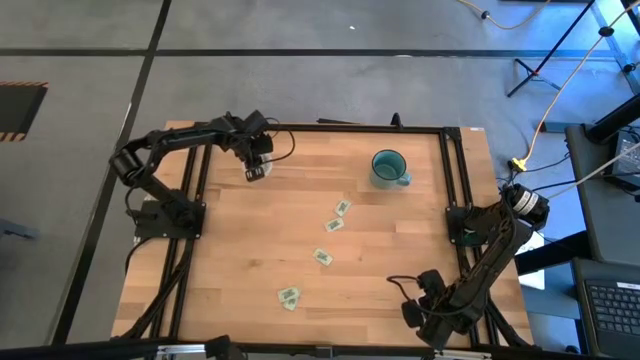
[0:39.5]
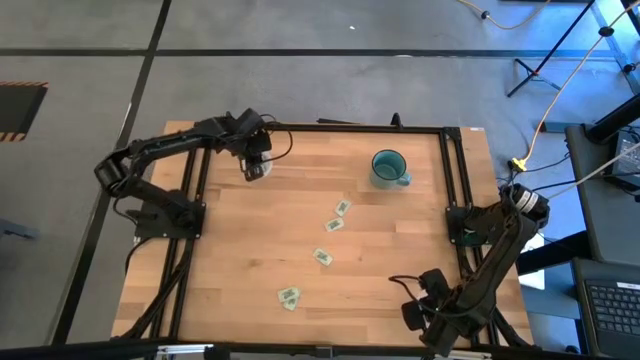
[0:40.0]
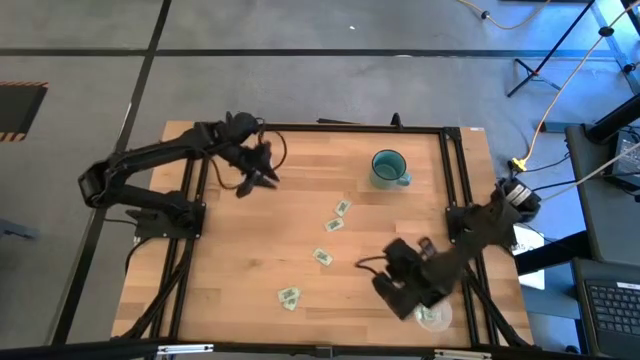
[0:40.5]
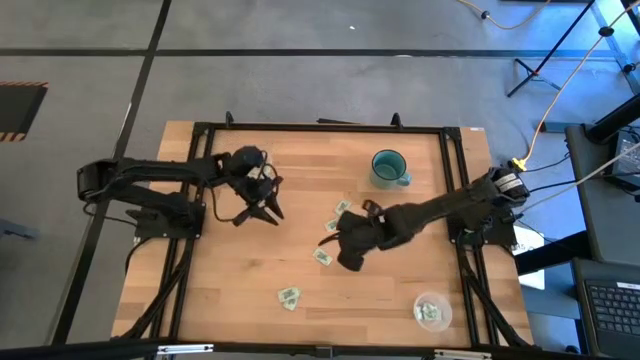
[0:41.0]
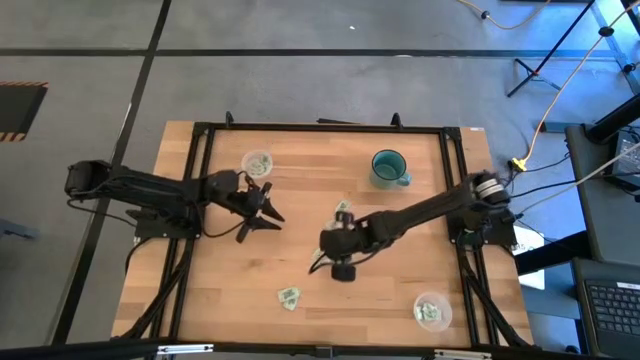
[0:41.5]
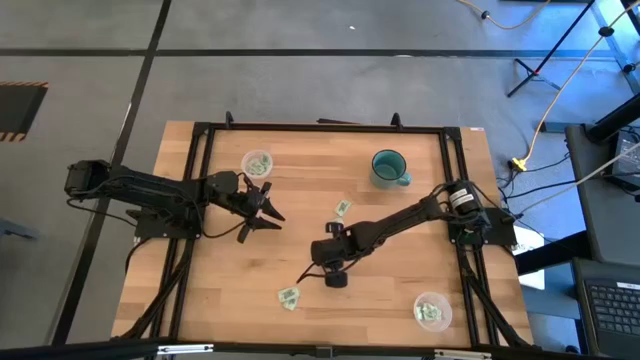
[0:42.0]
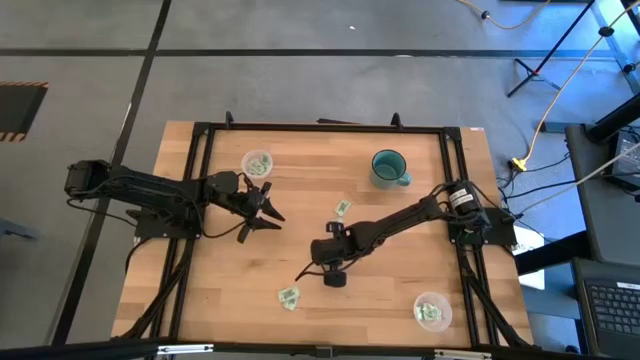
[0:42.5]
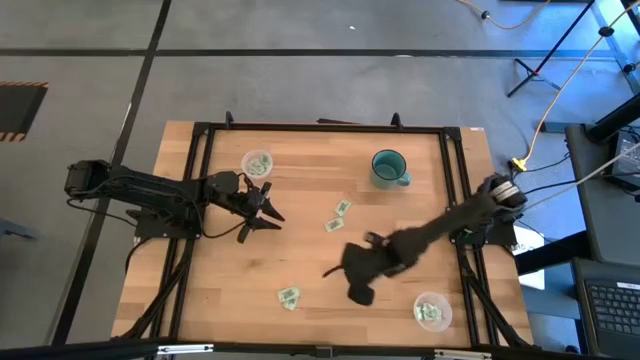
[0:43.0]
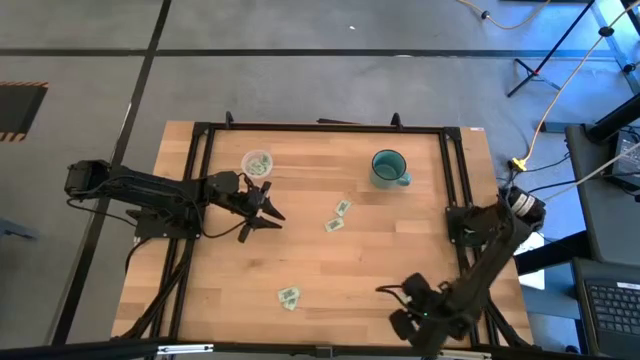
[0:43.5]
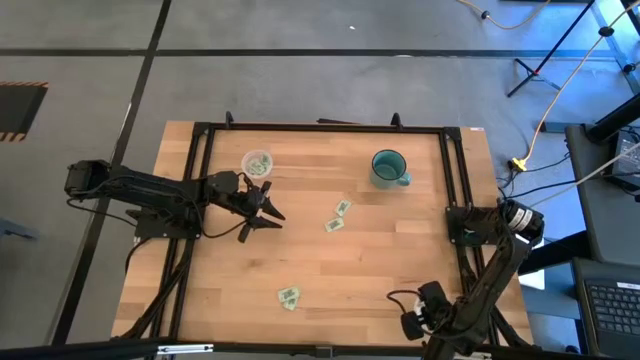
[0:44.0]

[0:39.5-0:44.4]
Task: Pick and place Stevia / Truvia into bins
Put the stevia packet into the bottom transparent container

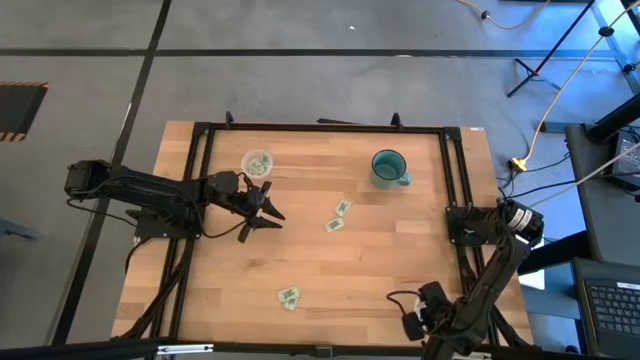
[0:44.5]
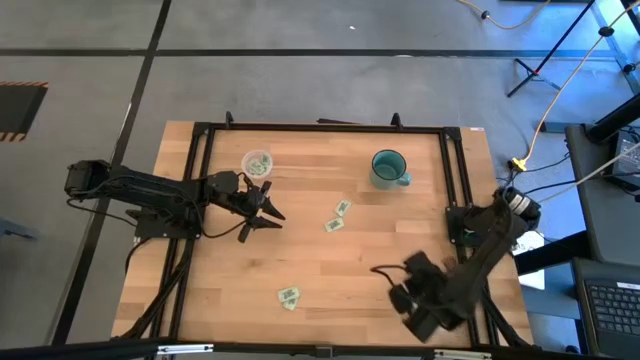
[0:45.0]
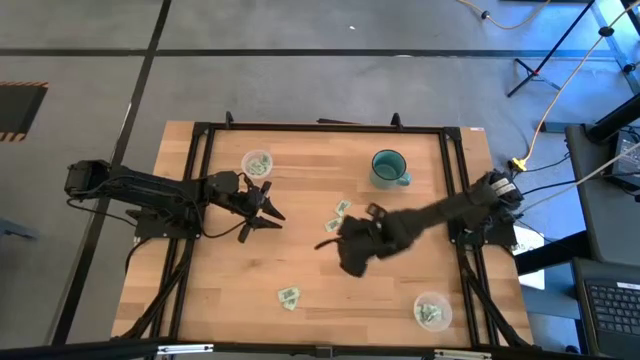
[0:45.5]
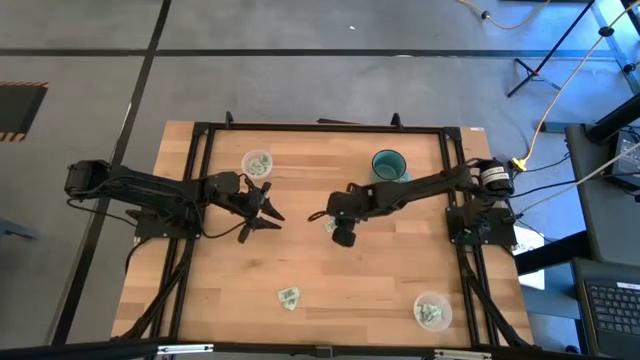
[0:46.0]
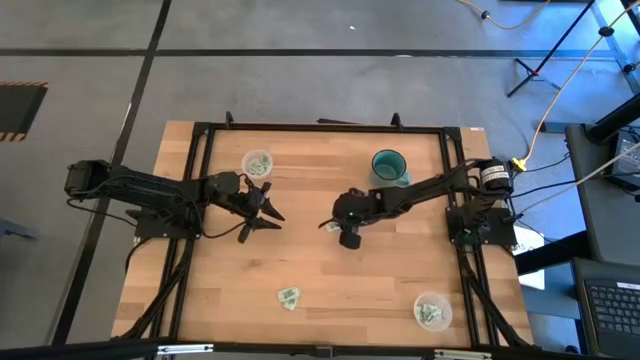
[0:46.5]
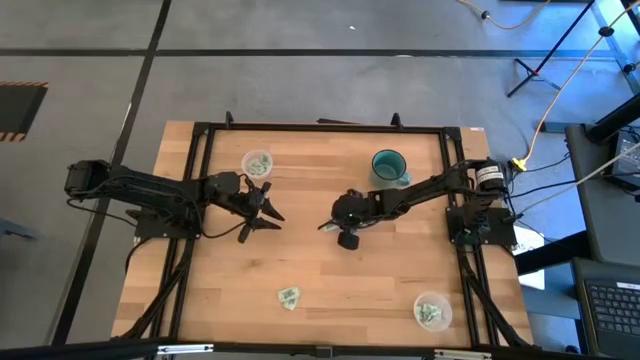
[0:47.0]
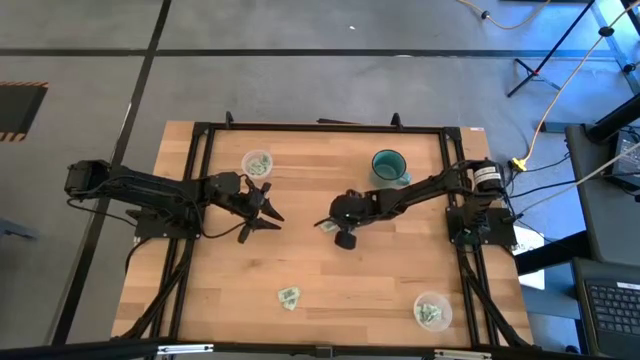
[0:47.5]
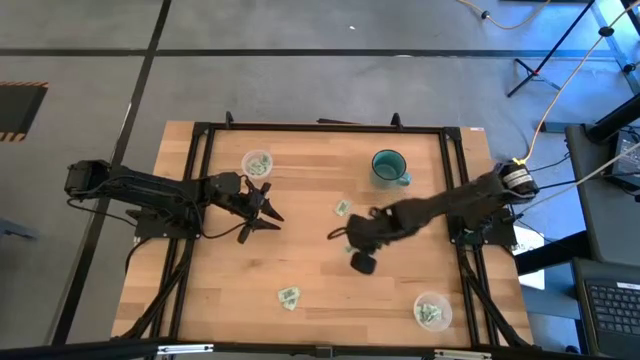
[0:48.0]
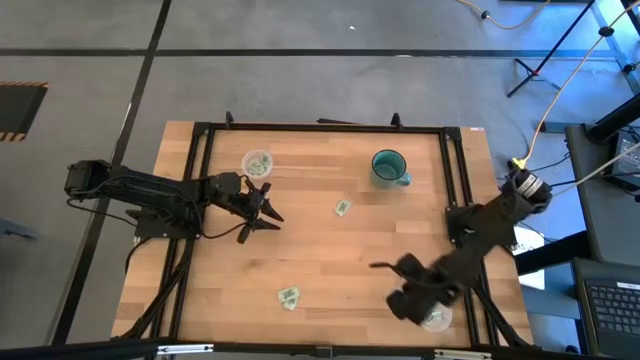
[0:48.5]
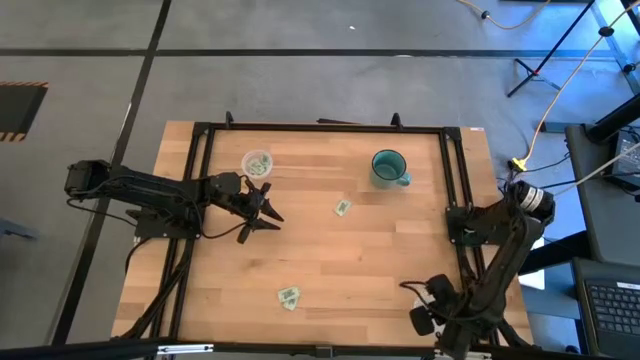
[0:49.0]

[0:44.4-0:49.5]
Put the stevia packet into the bottom transparent container

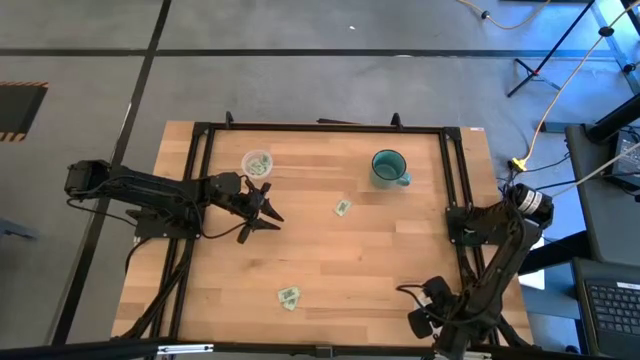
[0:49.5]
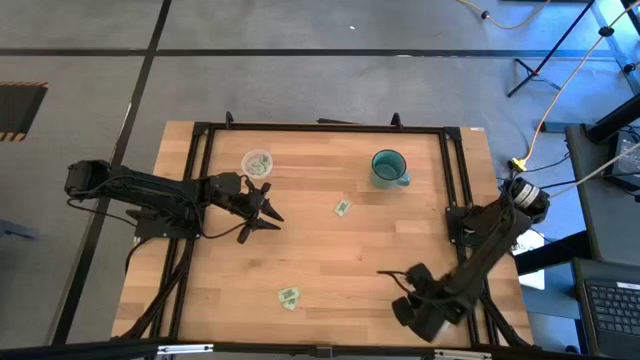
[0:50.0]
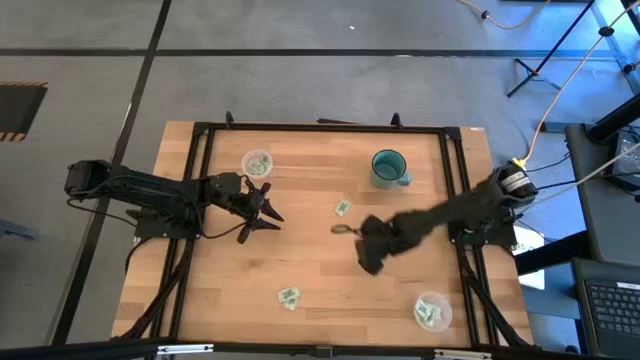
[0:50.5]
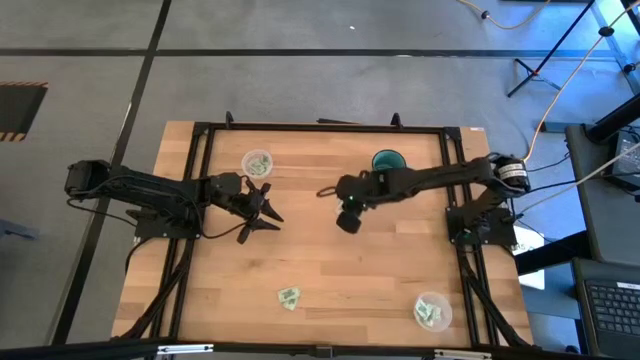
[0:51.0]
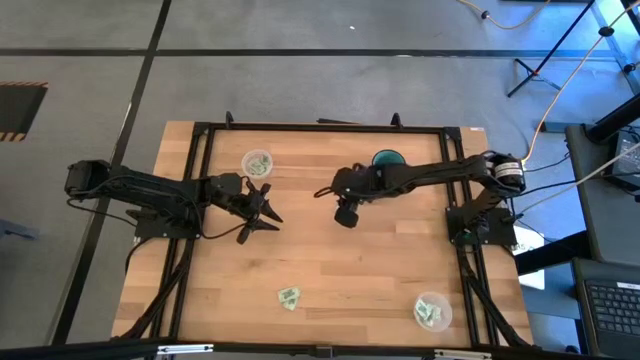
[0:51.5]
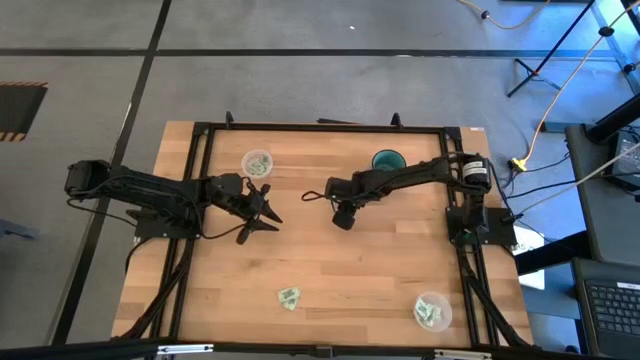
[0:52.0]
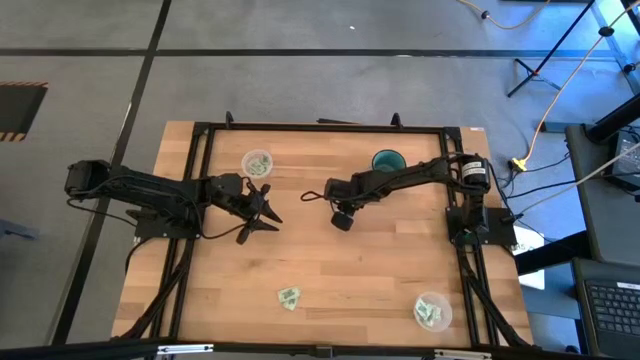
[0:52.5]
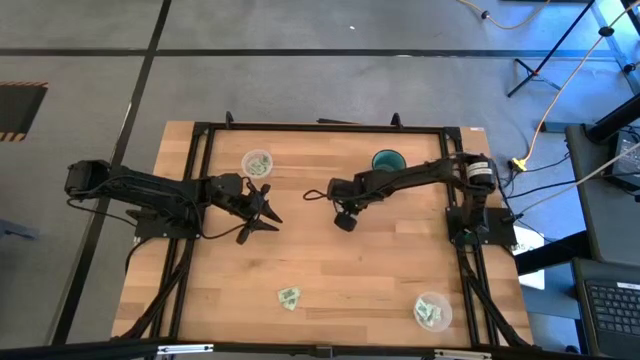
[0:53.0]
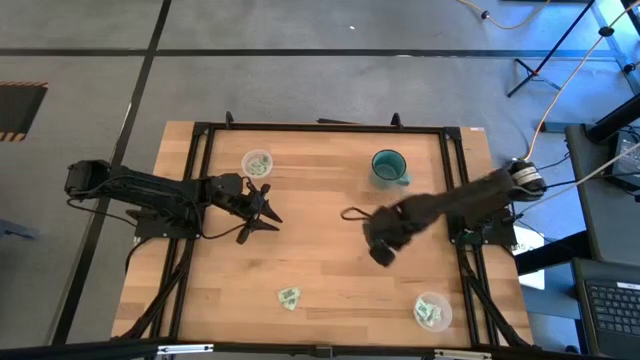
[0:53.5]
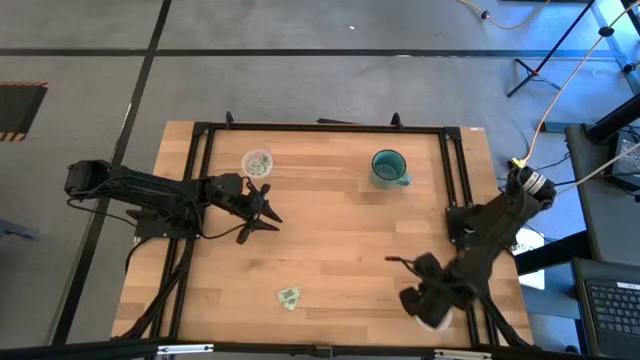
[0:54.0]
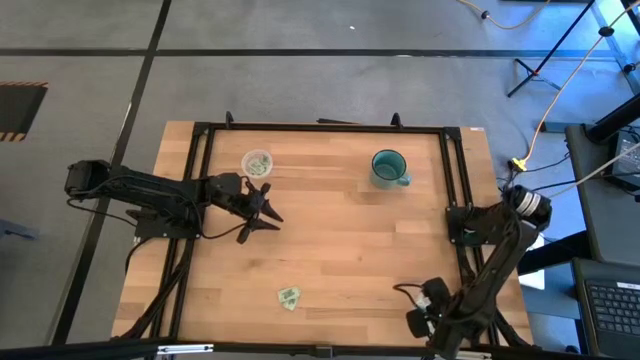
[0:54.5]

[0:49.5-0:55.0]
Put the stevia packet into the bottom transparent container

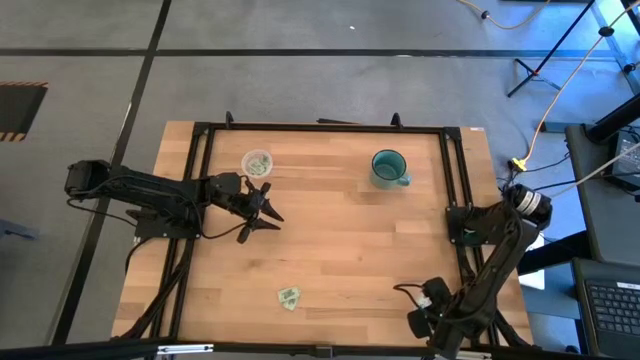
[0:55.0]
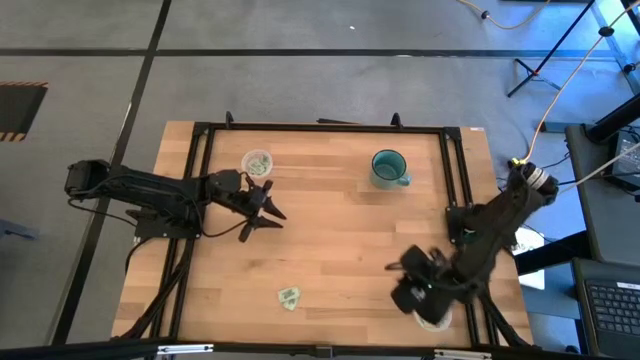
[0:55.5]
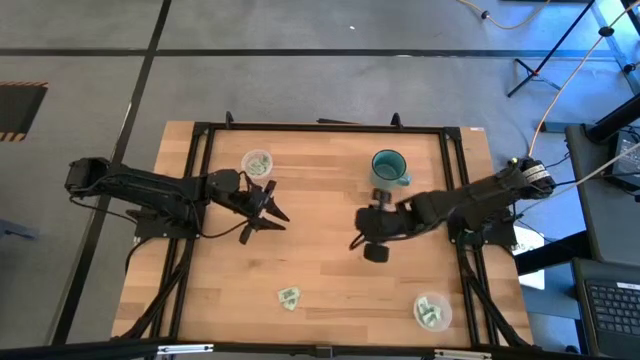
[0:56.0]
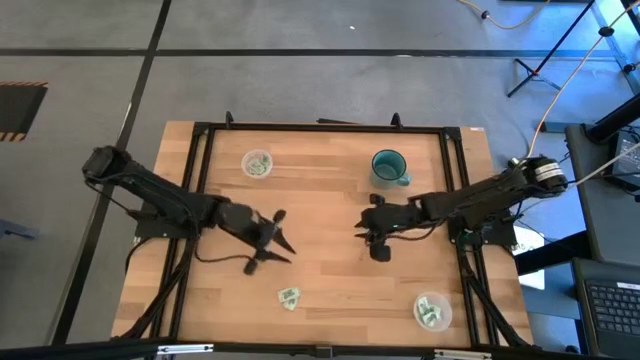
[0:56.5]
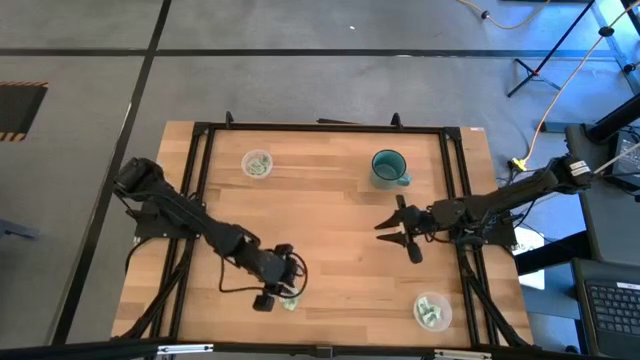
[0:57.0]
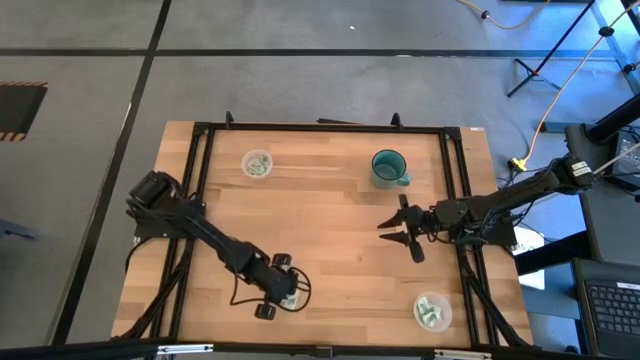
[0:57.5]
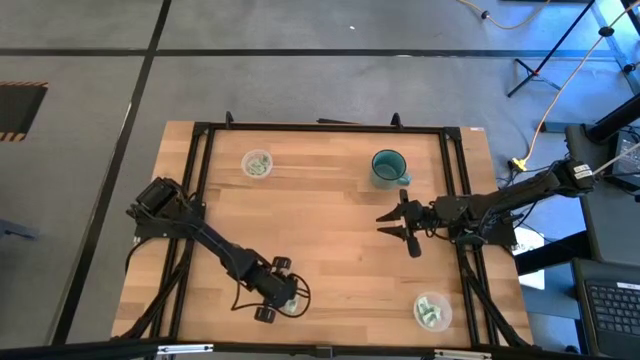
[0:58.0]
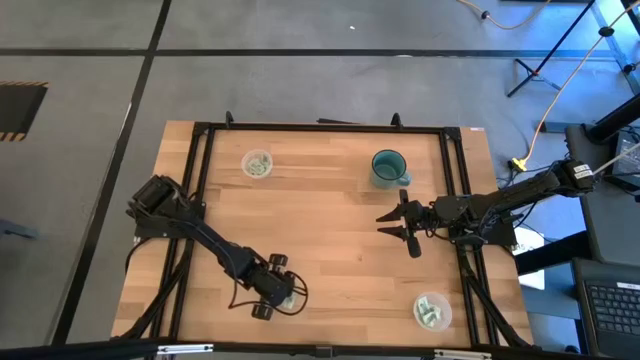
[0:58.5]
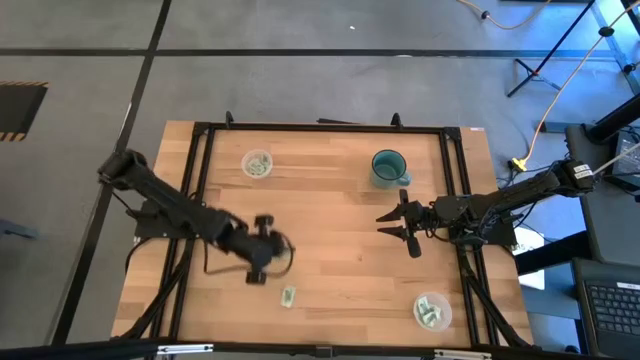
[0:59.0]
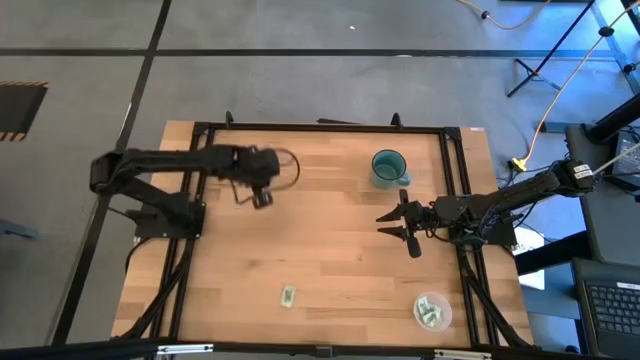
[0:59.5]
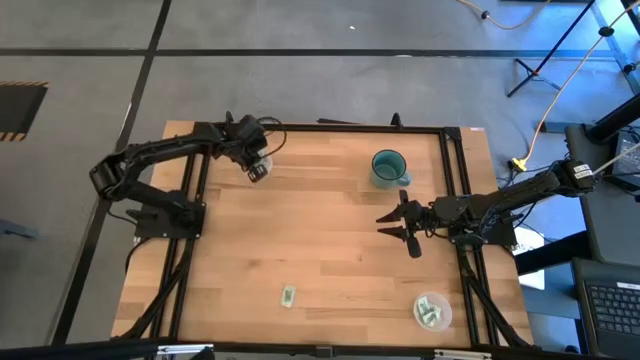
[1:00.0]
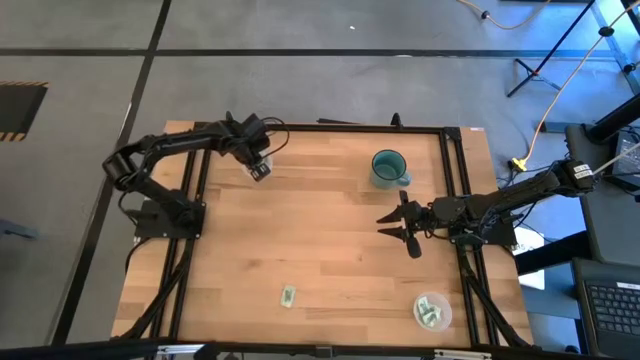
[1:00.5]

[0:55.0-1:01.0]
Put the stevia packet into the top transparent container
